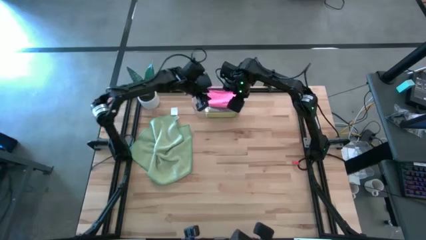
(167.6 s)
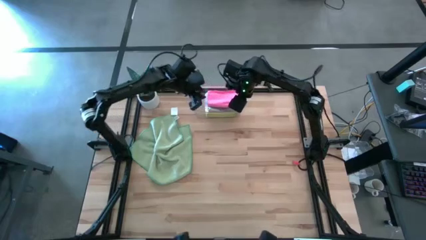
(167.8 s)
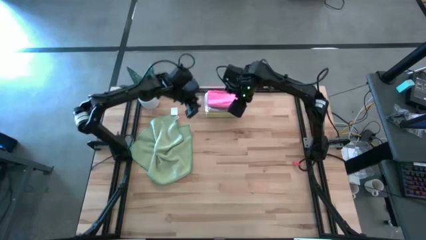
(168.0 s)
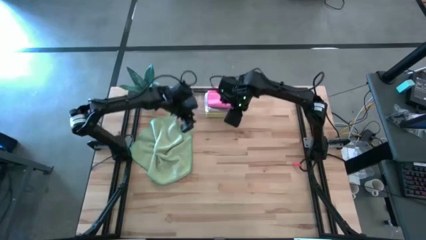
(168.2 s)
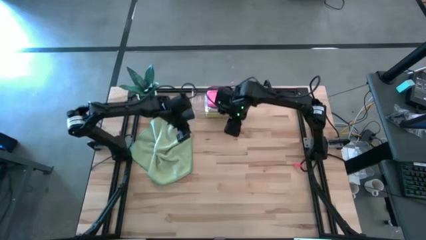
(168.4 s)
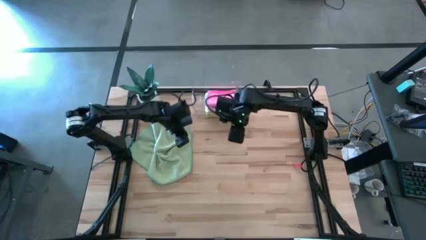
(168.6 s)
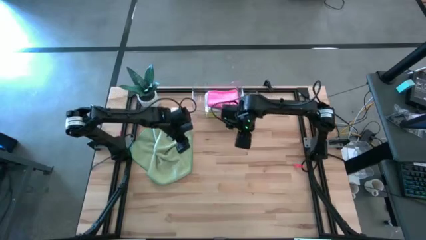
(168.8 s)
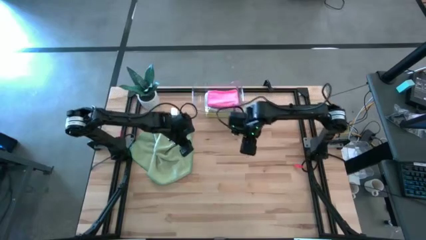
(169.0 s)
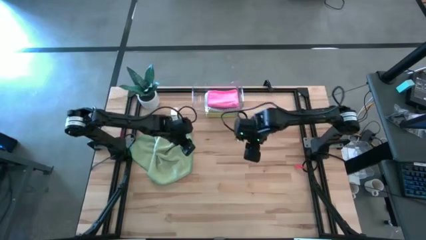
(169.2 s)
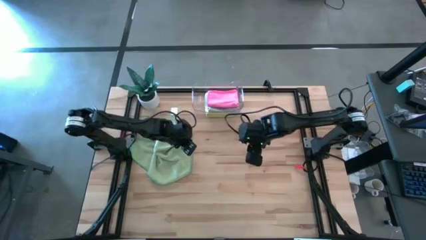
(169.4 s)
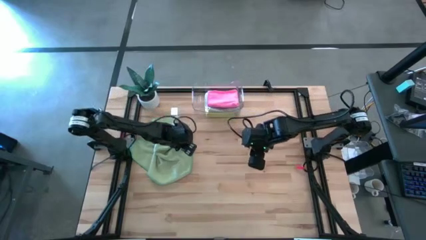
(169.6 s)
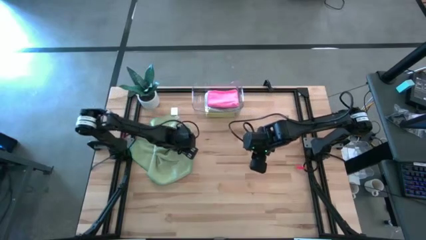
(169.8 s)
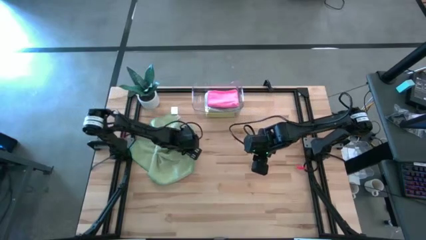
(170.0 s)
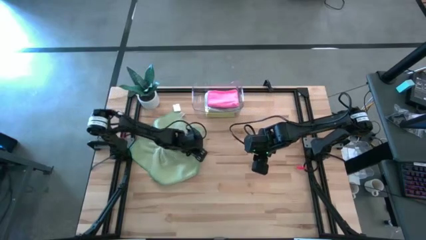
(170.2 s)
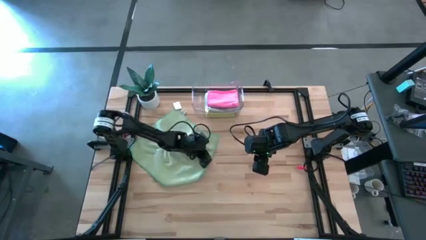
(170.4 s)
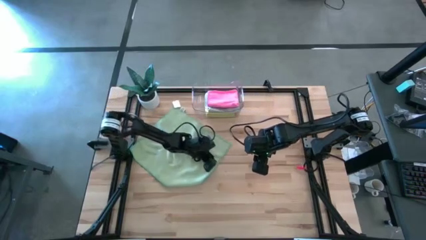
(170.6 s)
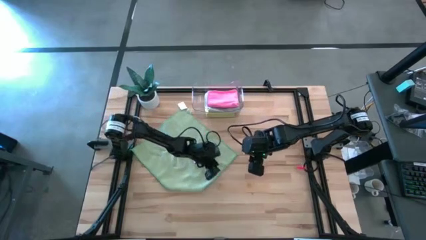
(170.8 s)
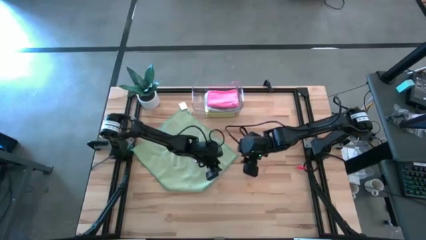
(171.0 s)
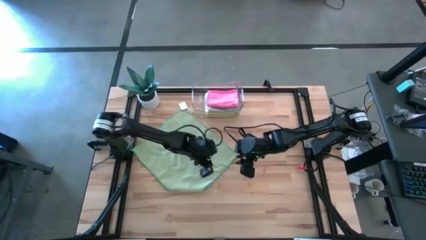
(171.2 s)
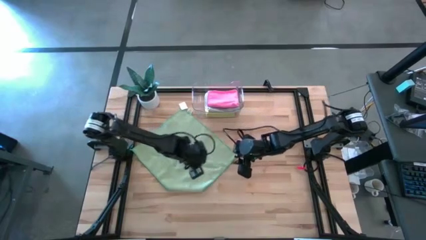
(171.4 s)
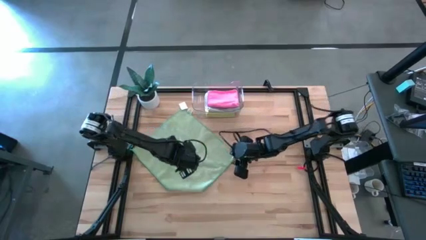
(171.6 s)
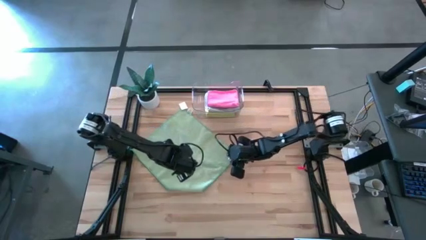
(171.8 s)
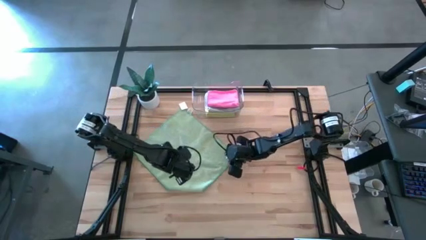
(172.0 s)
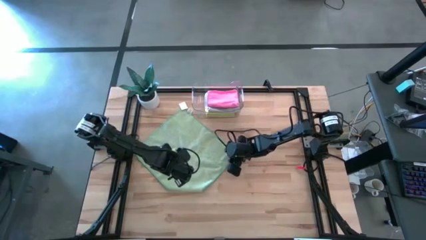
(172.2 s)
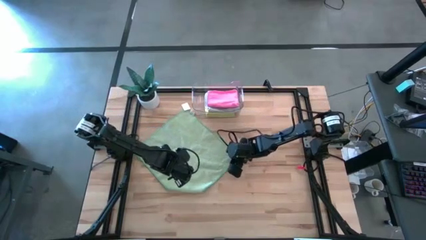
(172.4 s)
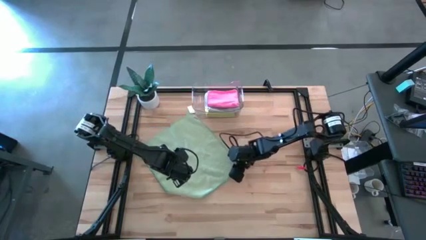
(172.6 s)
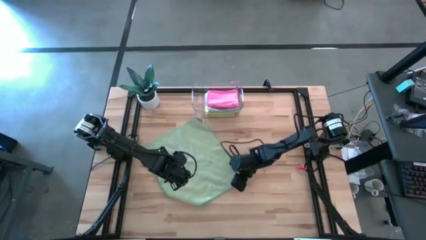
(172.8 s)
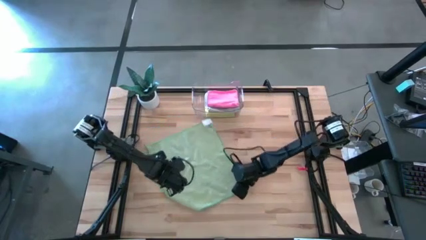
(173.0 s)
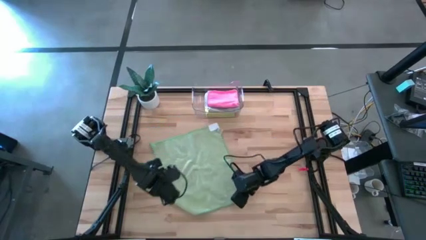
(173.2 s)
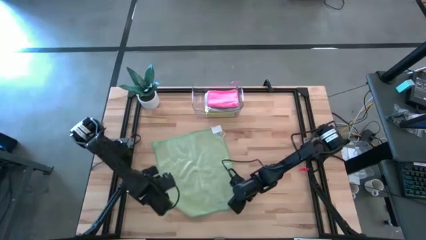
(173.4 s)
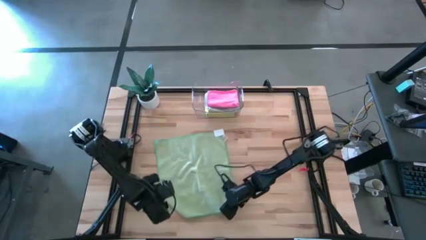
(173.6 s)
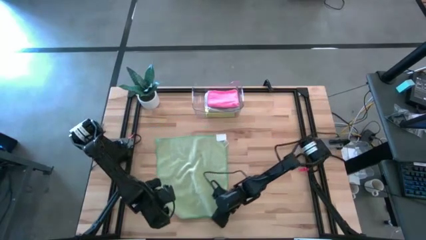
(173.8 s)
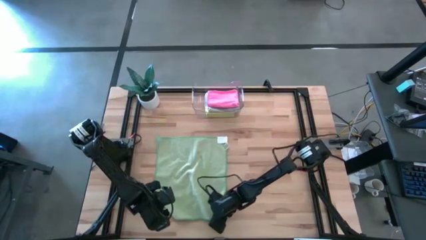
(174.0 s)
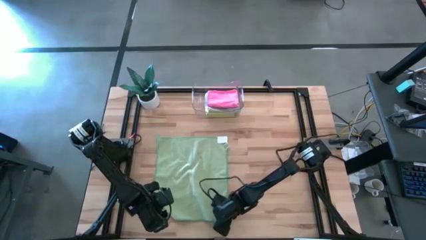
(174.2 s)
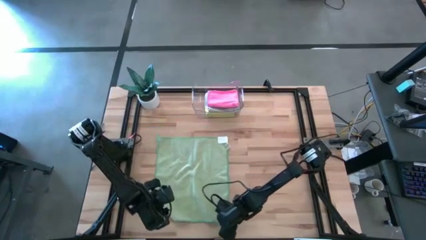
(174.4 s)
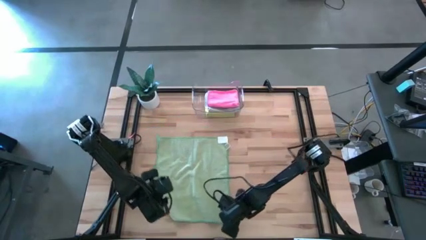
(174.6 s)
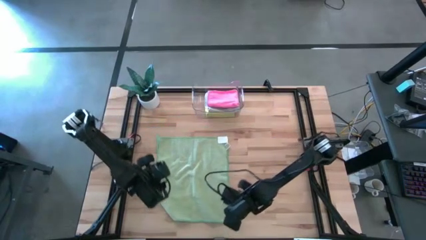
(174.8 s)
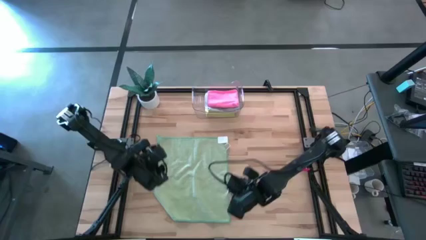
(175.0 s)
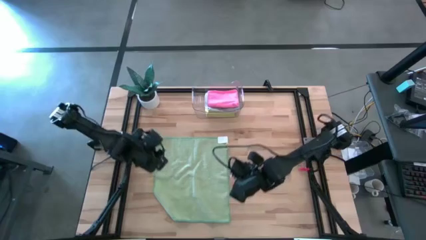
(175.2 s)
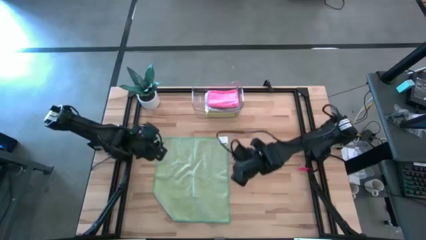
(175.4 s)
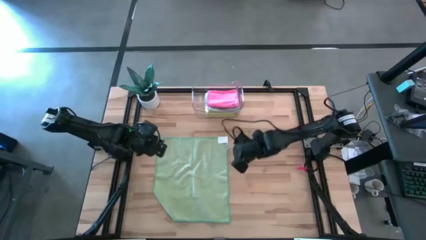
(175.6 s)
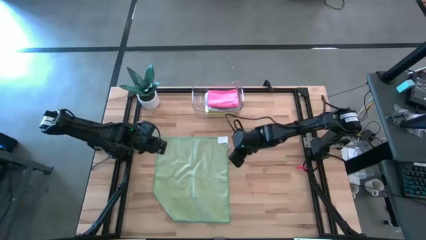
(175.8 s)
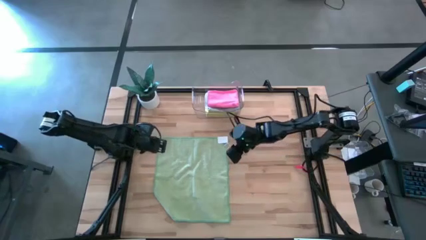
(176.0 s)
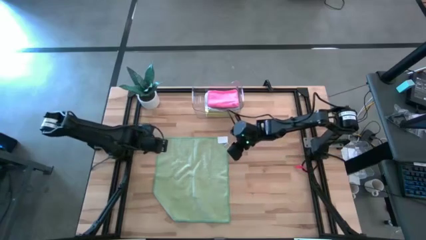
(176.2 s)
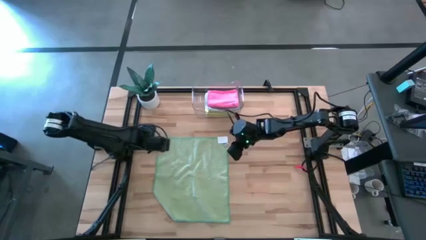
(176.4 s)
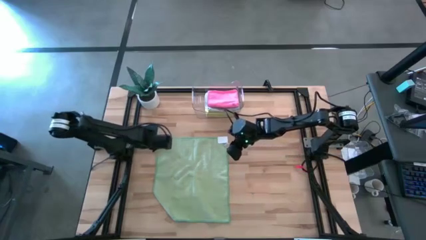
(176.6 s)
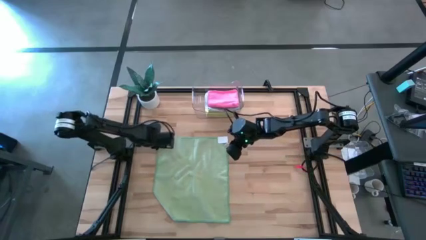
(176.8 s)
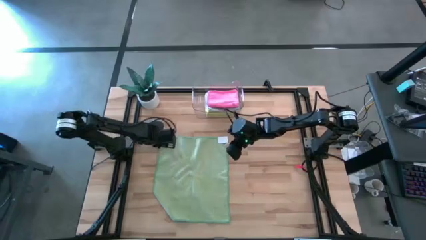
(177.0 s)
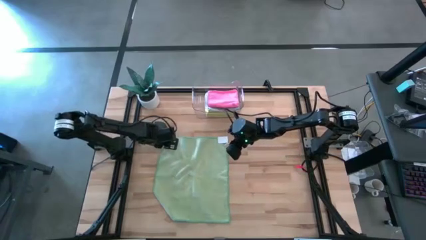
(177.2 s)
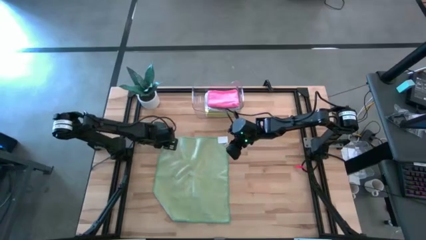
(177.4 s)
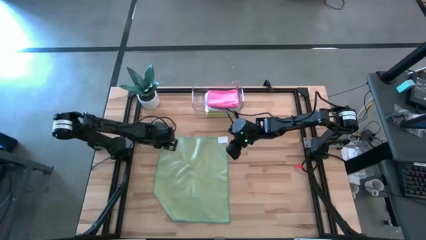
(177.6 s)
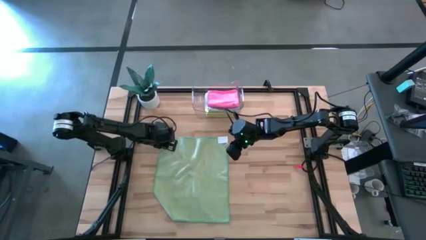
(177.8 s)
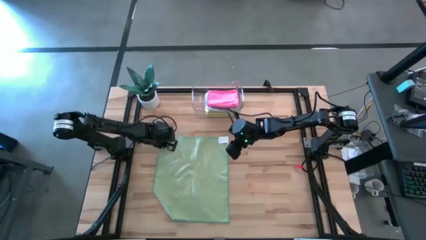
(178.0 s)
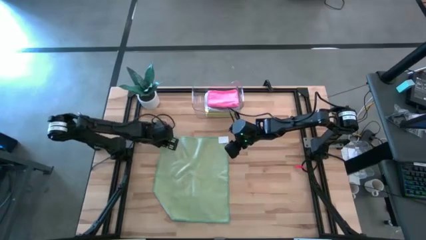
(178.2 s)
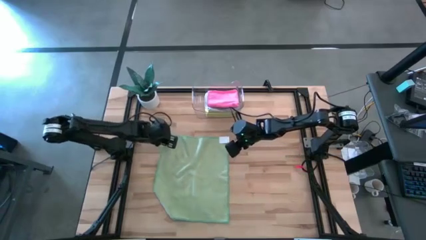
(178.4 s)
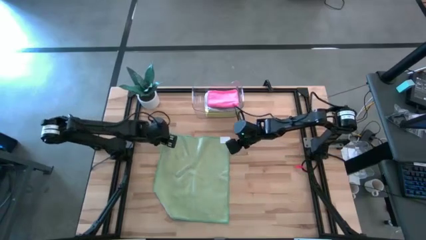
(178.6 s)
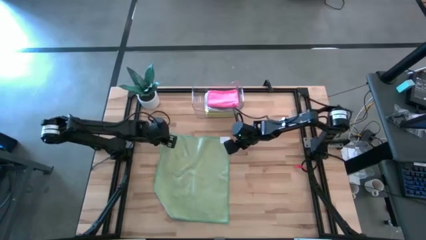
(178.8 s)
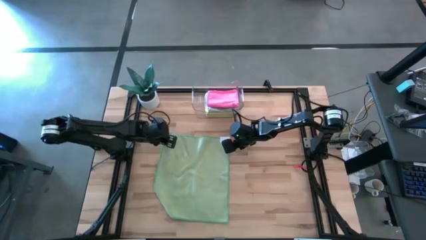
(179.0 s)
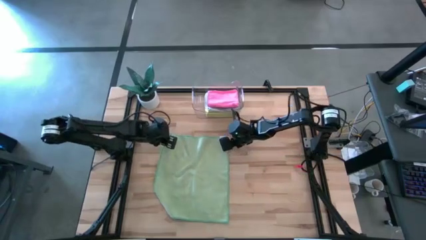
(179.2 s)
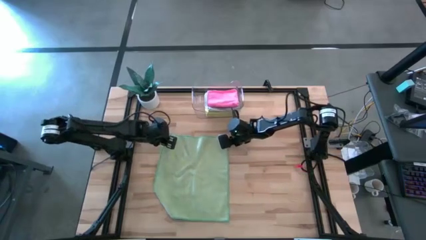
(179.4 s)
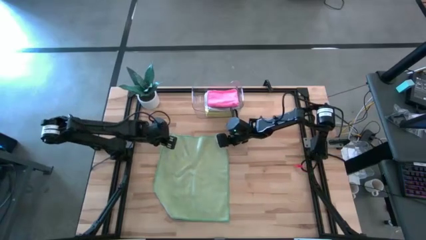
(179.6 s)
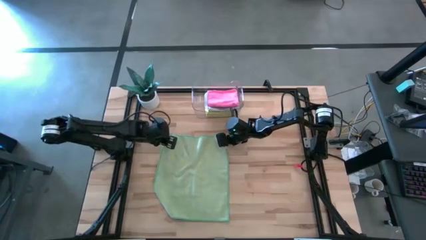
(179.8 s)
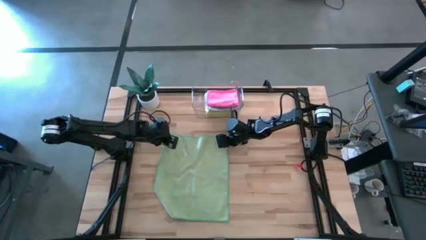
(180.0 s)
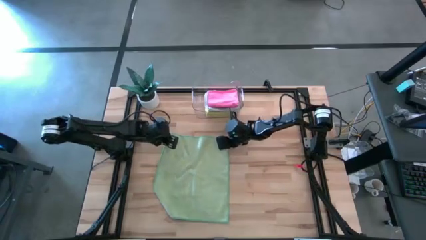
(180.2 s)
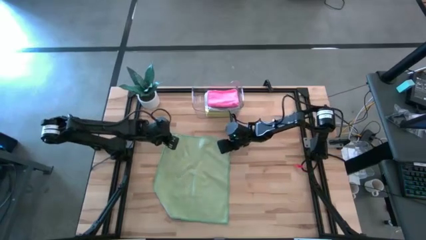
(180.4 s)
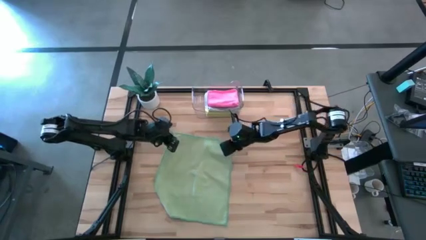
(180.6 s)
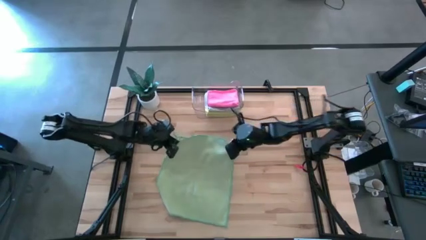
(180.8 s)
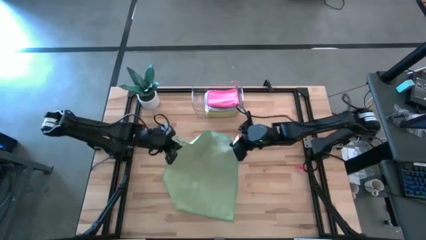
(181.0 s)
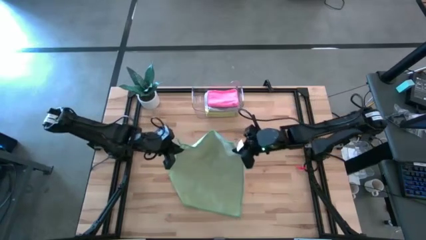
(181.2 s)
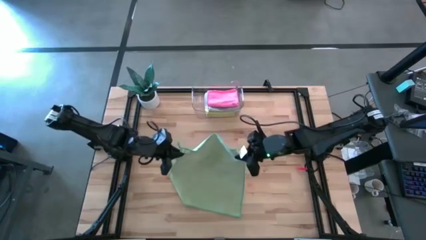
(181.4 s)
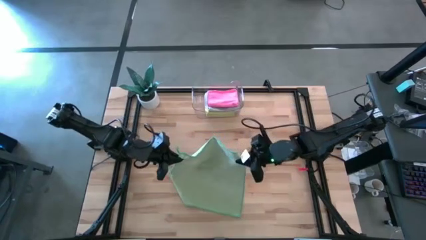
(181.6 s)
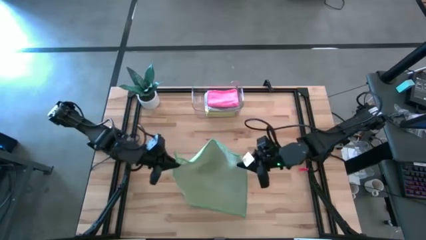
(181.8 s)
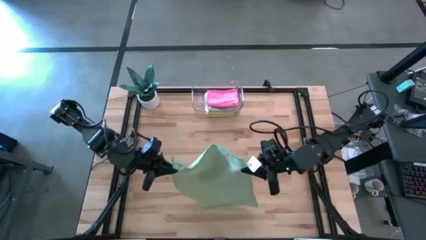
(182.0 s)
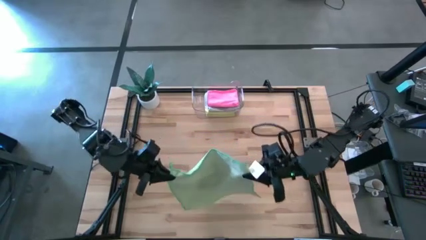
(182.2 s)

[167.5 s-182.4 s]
Task: Fold microfiber towels
Fold the green microfiber cloth

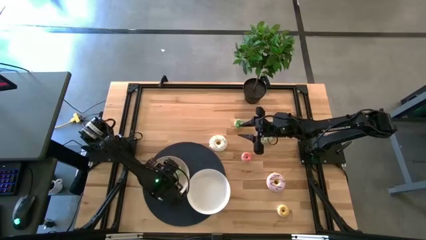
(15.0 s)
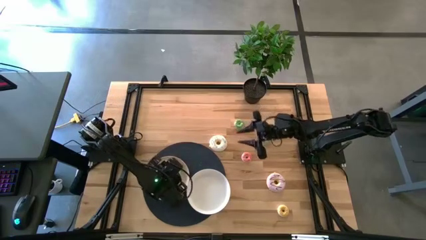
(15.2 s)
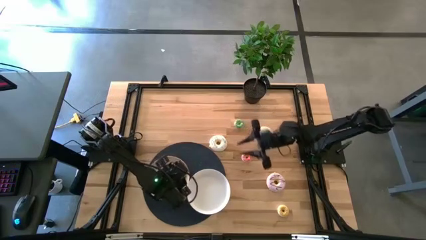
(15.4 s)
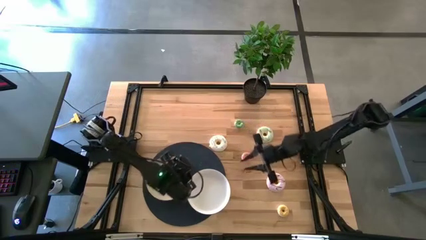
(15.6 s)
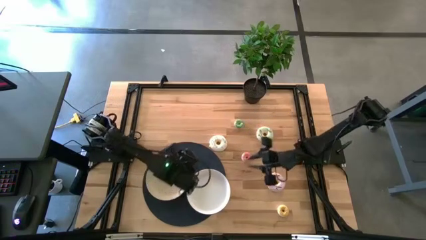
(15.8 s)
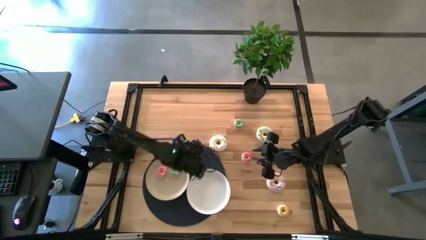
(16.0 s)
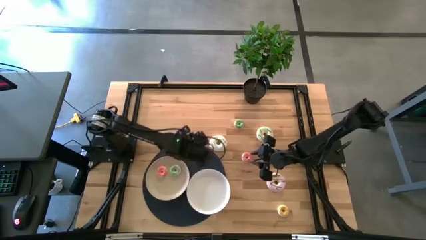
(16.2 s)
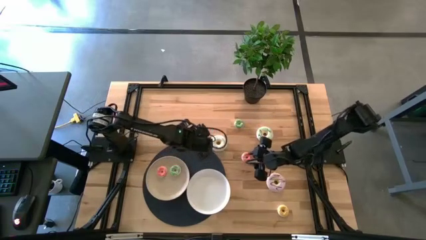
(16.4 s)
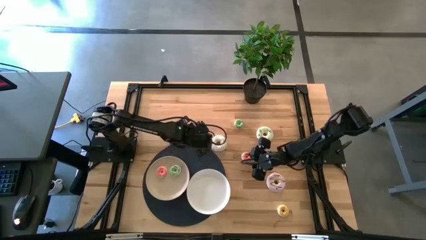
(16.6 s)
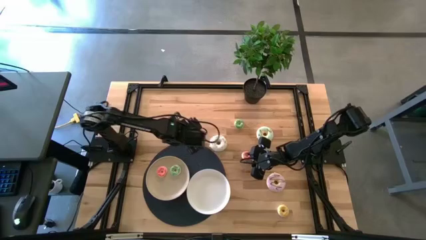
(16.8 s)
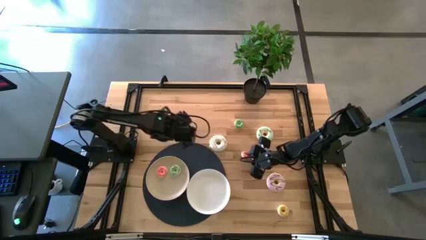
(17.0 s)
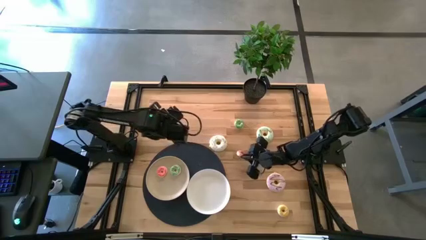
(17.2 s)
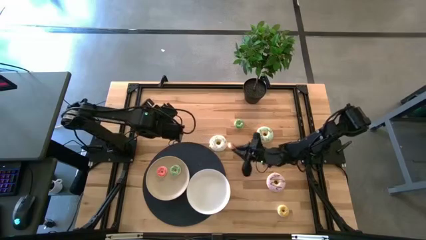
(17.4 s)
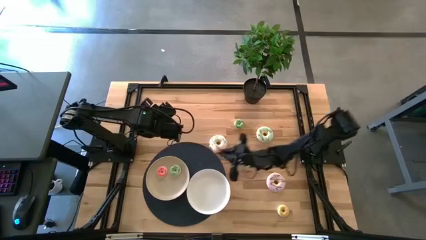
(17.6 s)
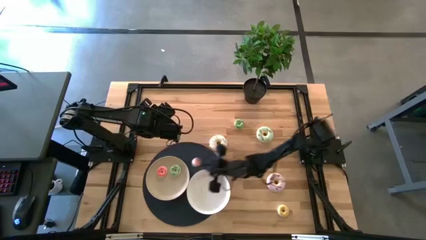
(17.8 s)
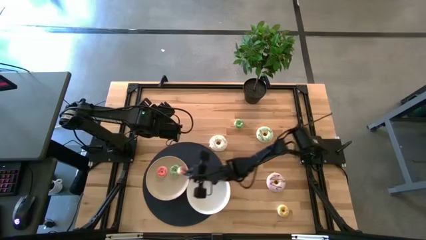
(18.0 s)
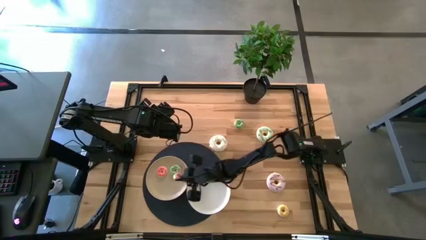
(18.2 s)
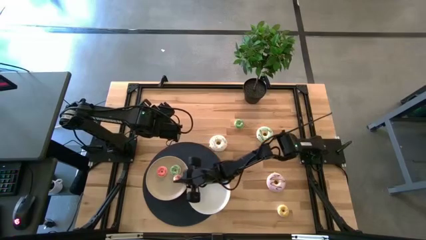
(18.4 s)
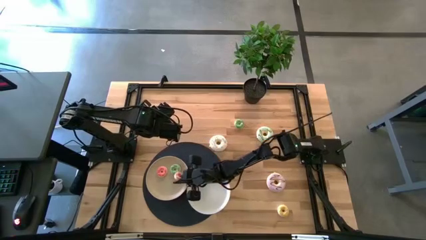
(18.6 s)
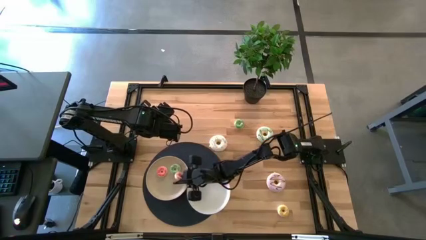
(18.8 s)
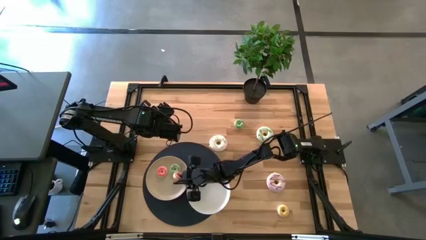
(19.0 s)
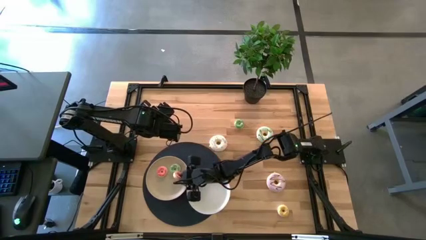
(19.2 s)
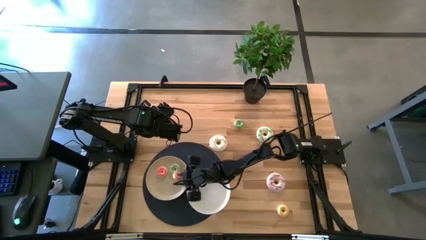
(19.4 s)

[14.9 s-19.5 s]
Task: Pick & Place donuts
Put the small pink donut on the left white plate
